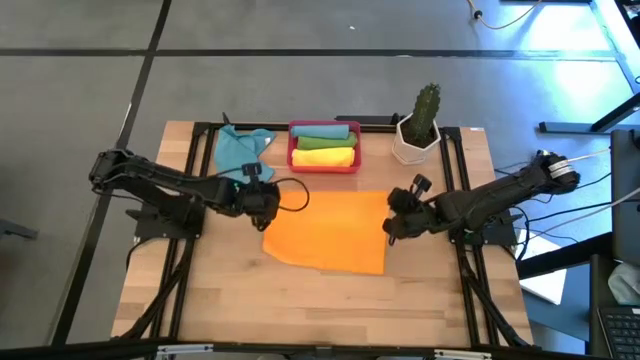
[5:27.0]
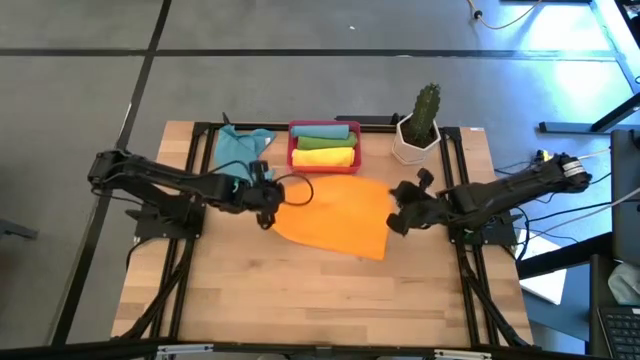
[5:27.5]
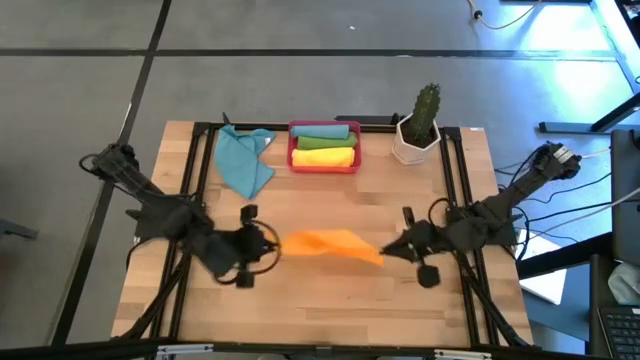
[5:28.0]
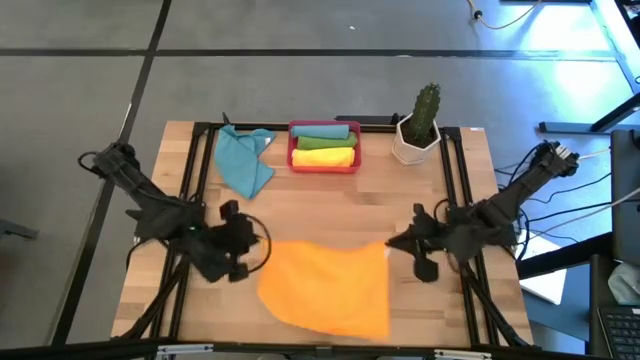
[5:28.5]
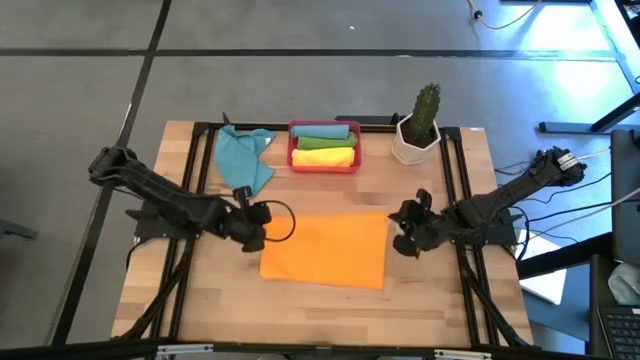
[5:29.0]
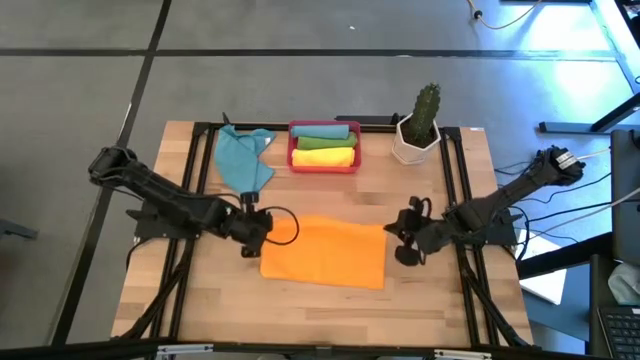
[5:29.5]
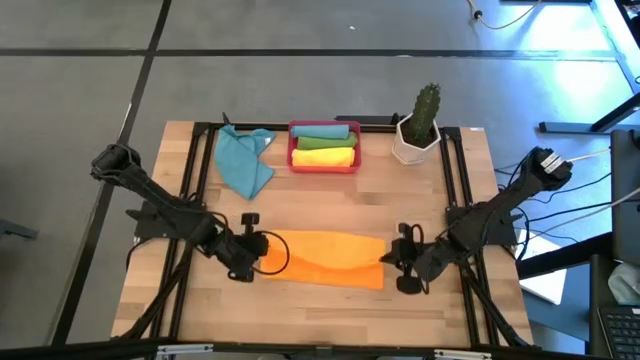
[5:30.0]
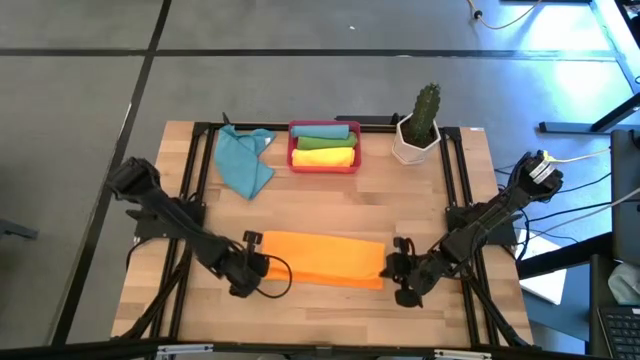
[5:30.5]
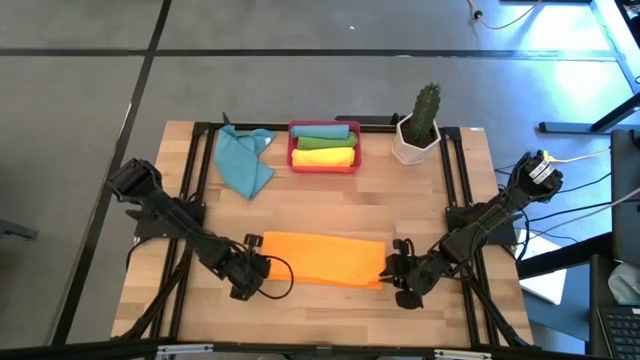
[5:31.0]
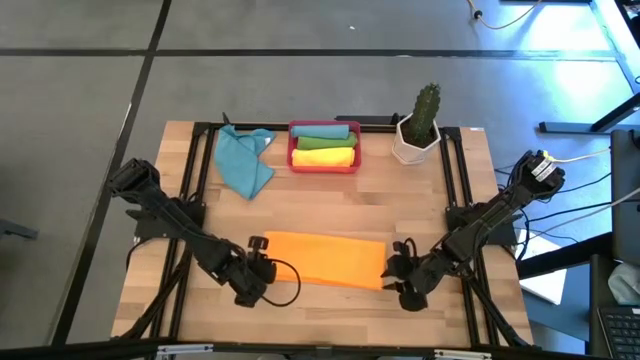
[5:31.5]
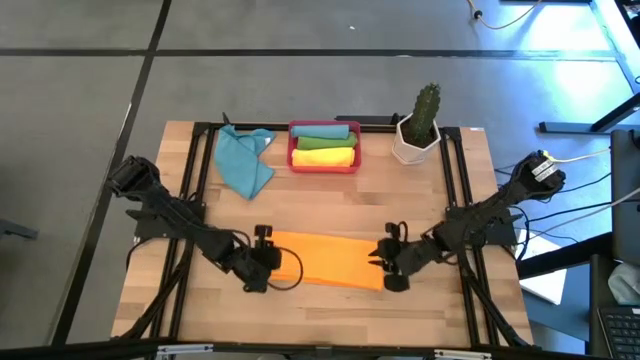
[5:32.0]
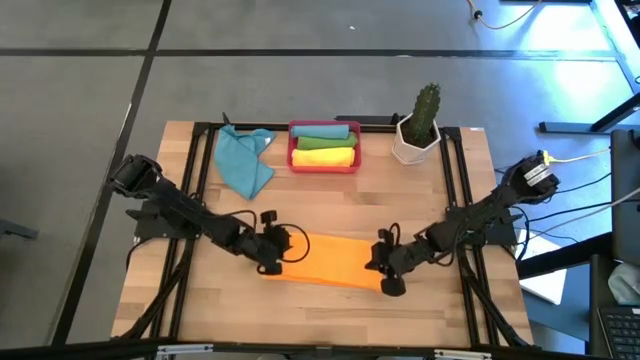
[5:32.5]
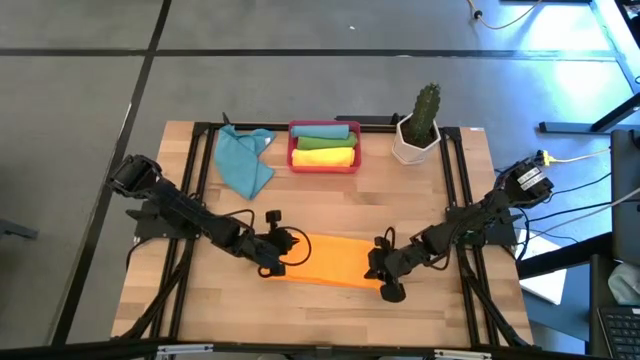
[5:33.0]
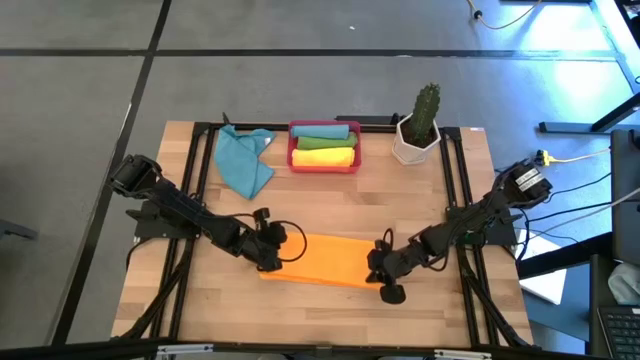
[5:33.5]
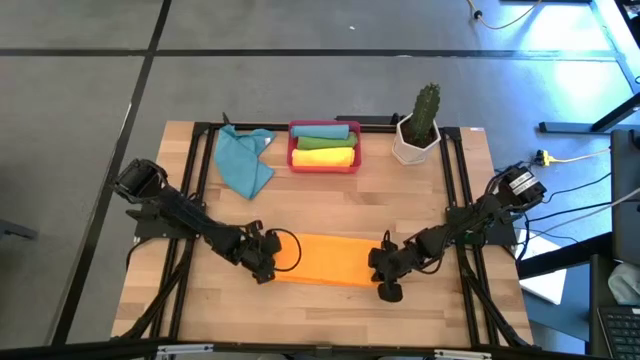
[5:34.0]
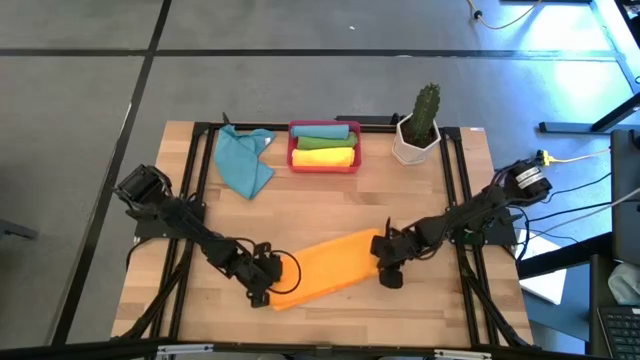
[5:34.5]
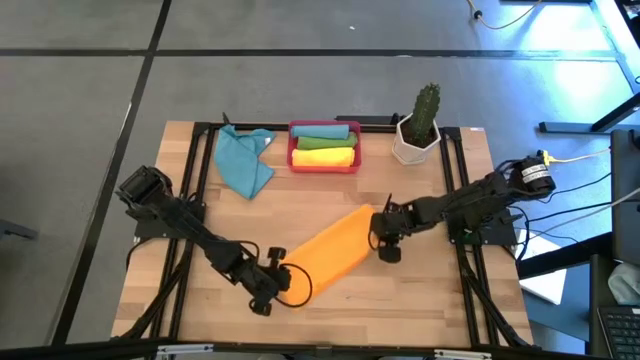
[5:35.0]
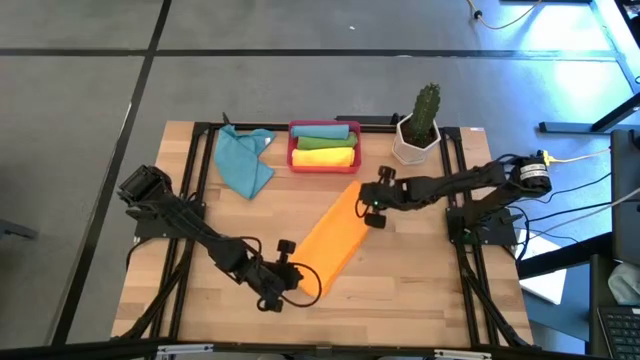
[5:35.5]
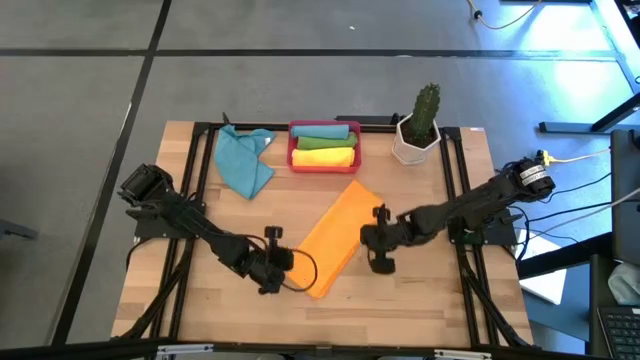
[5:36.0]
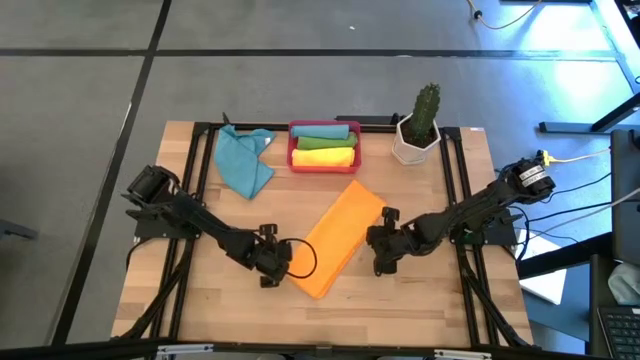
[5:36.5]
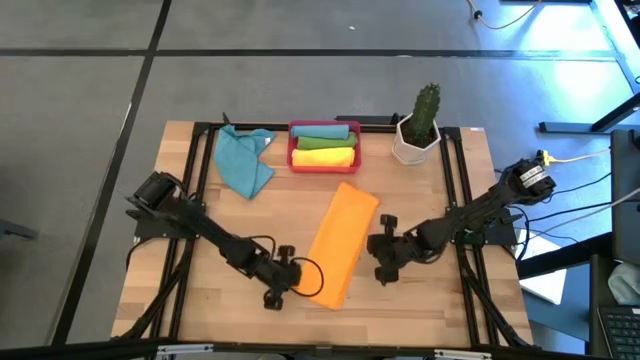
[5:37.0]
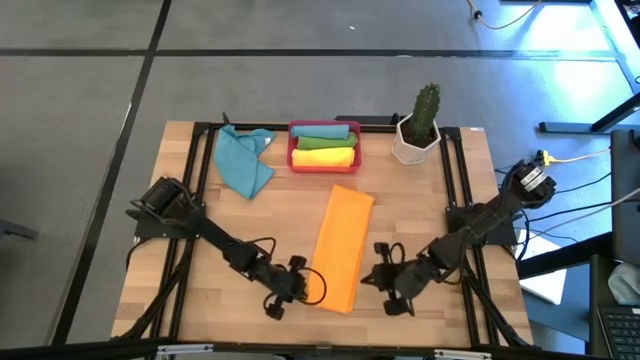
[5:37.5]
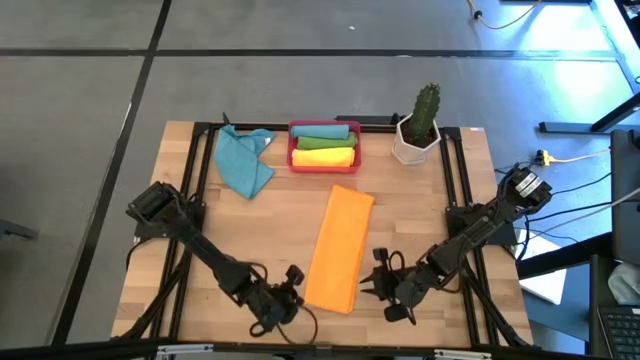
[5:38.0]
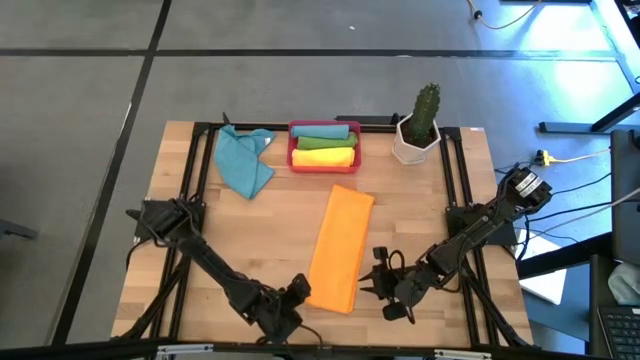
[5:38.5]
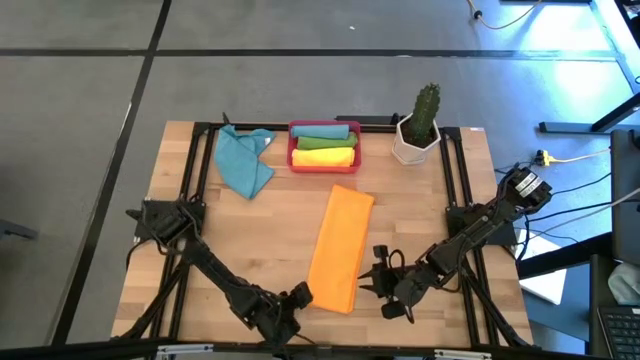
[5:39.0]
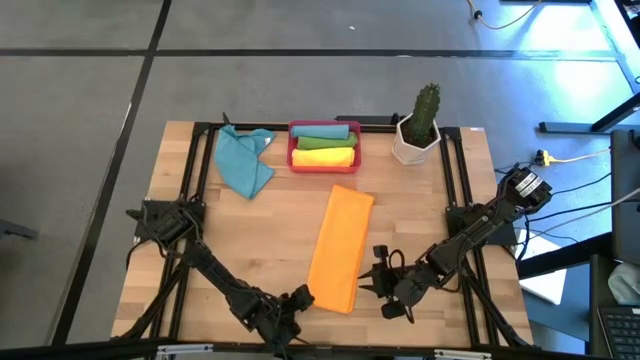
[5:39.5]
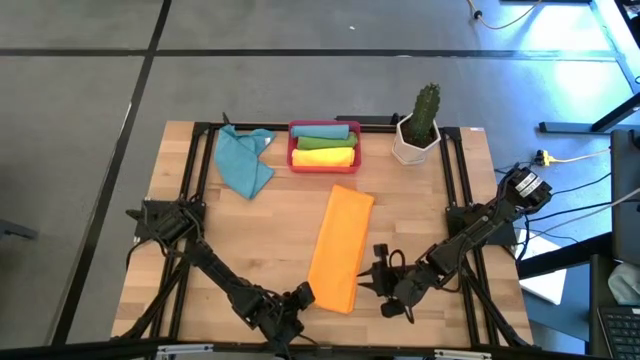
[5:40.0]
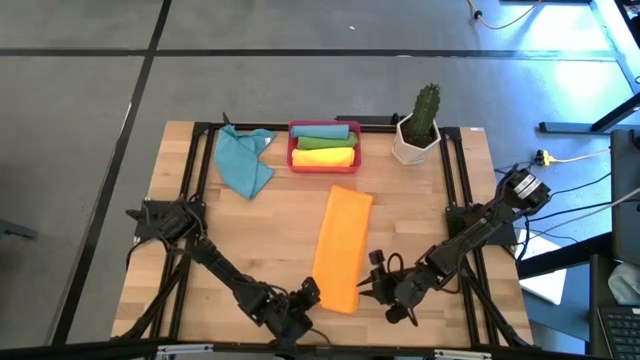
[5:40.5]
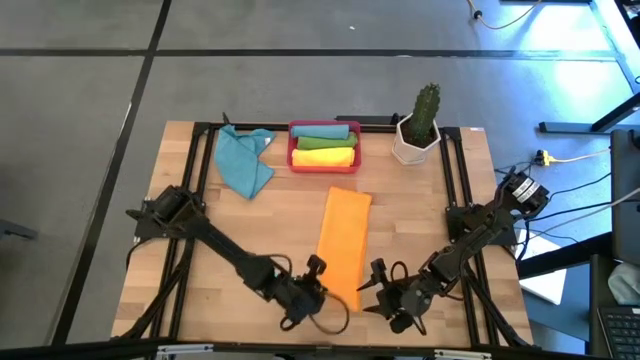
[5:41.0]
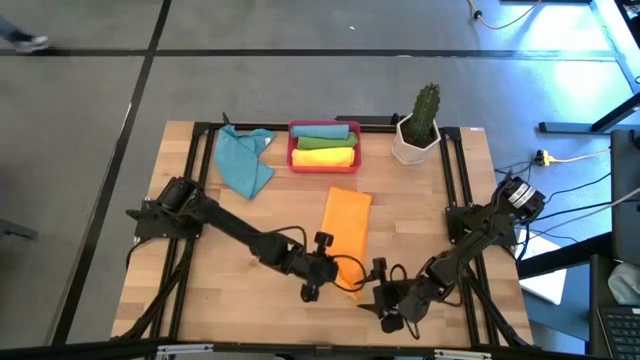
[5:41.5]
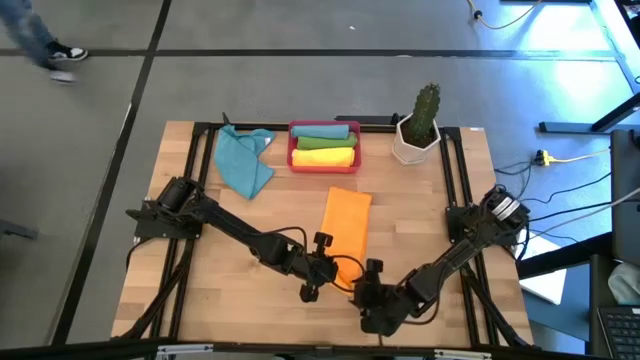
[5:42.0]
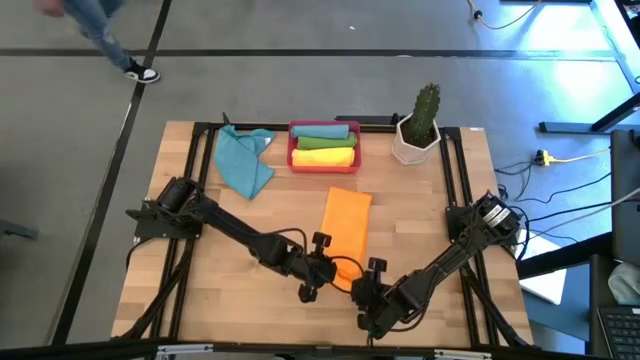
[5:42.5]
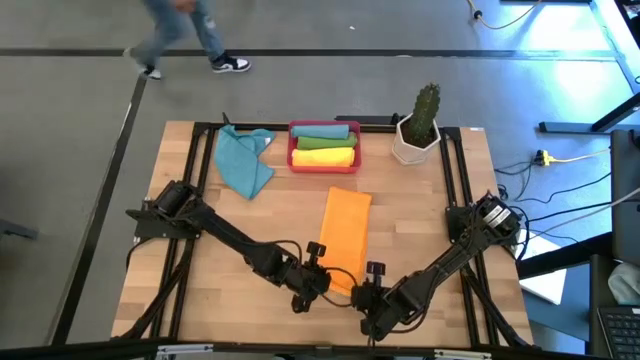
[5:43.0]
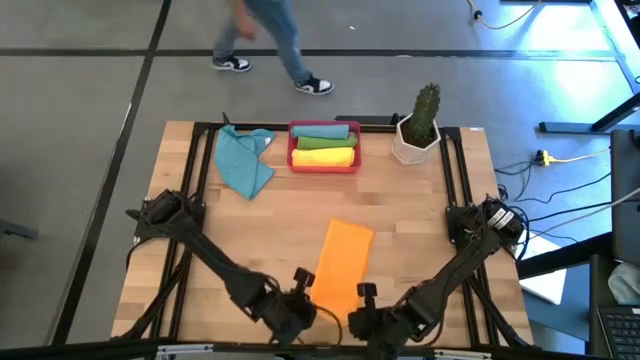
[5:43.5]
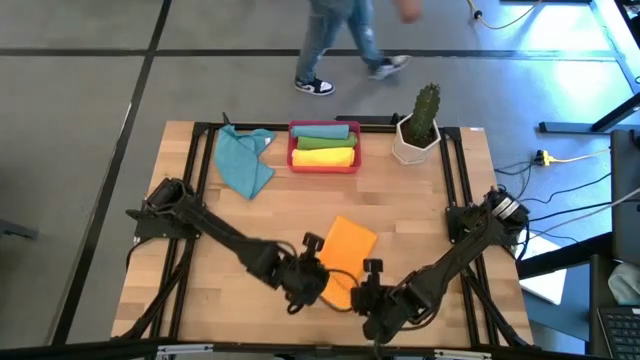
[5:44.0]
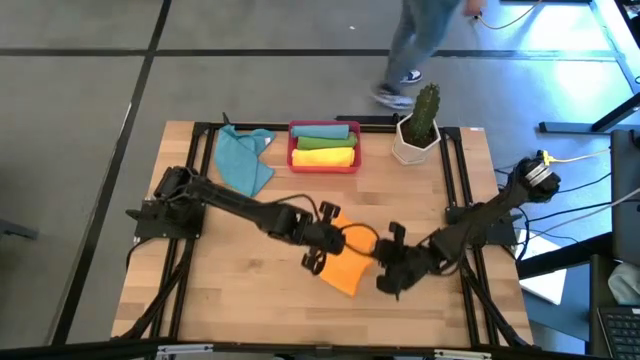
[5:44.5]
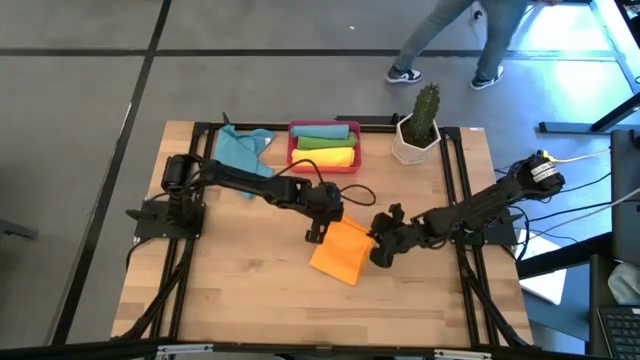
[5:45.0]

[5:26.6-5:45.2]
Task: Roll microfiber towels into tight, uniform cylinder then place into a basket
Roll the orange towel

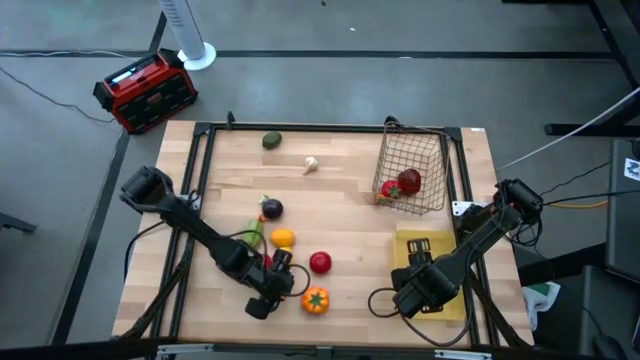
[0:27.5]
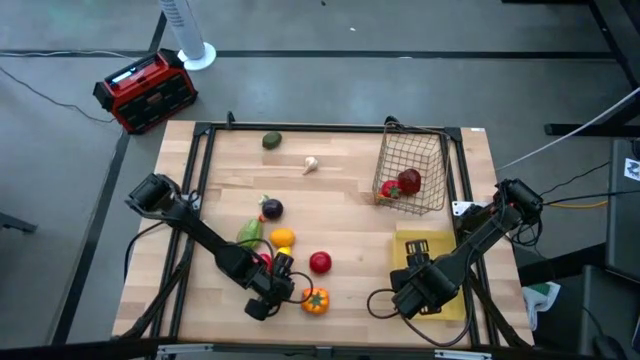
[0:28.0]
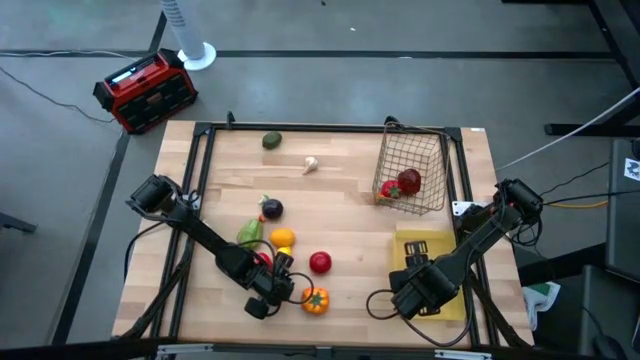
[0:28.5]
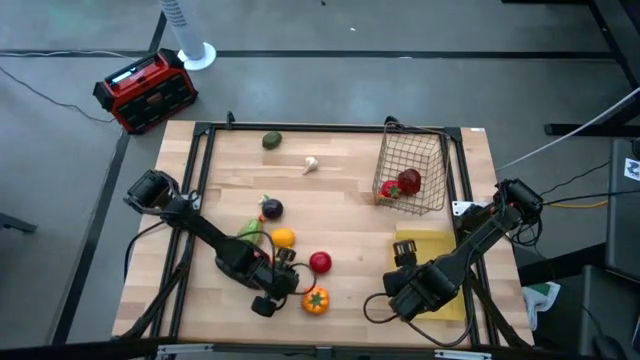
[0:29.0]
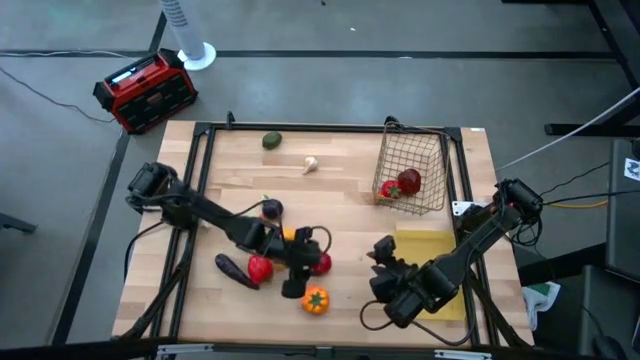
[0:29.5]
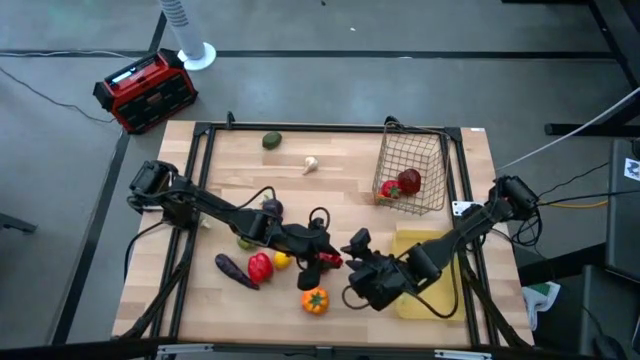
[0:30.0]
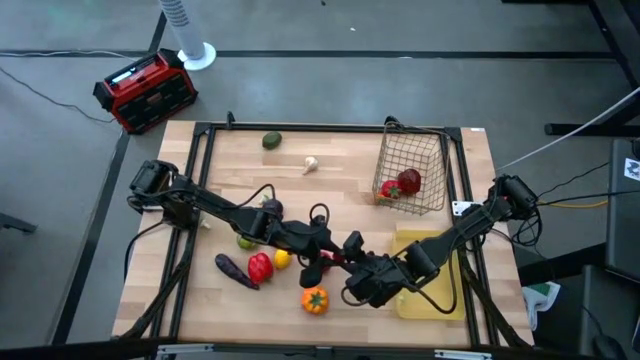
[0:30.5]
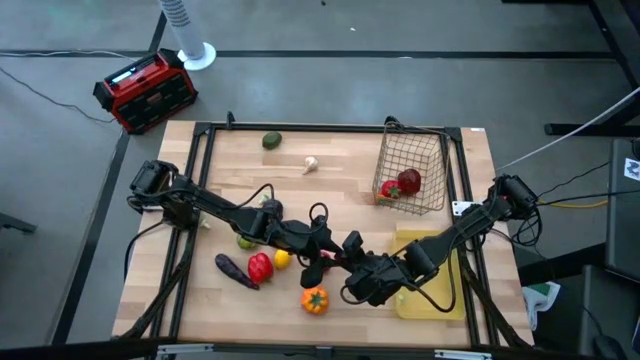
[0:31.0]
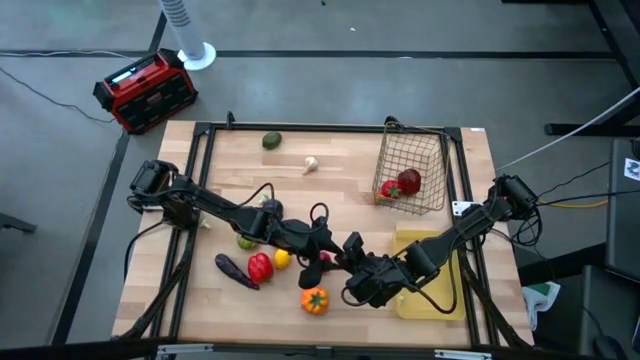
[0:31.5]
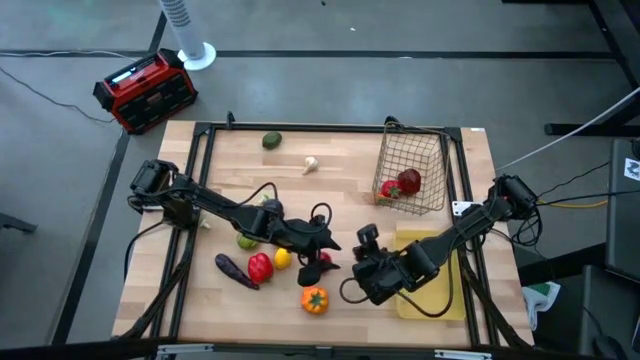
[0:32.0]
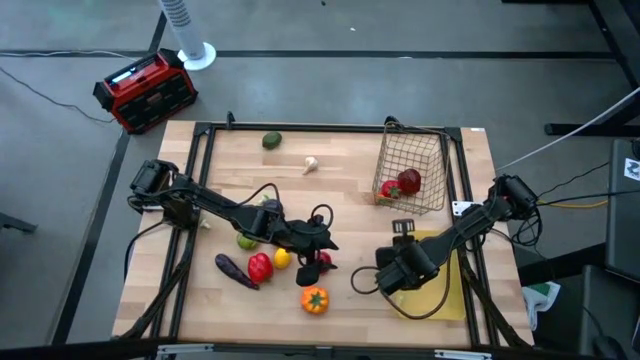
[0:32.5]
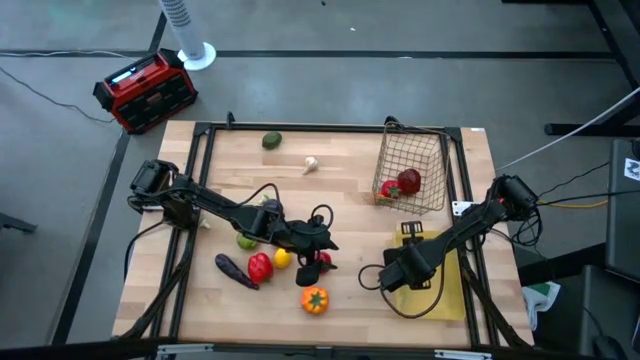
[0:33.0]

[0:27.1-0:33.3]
Task: Sort produce into baskets
Put the red chili pepper into the yellow bin
